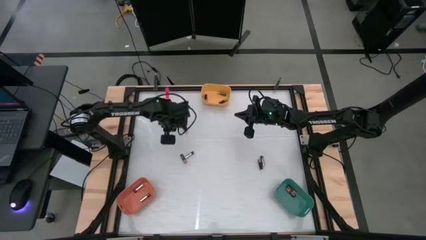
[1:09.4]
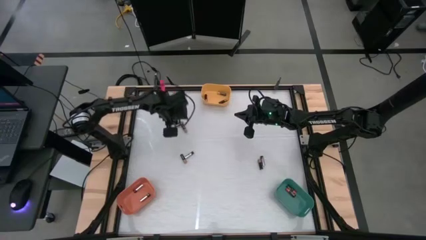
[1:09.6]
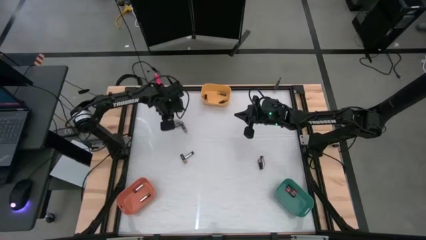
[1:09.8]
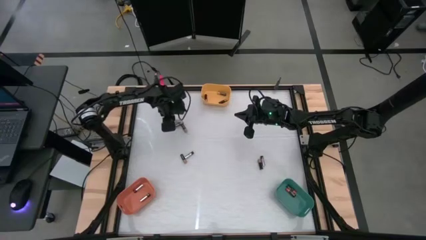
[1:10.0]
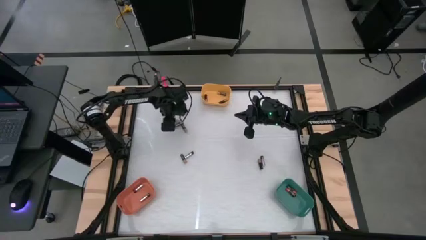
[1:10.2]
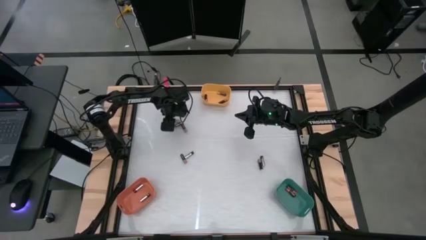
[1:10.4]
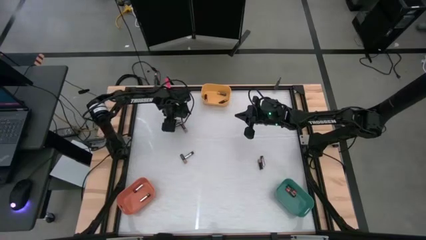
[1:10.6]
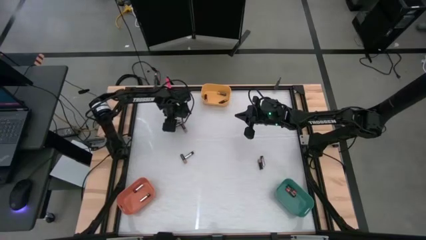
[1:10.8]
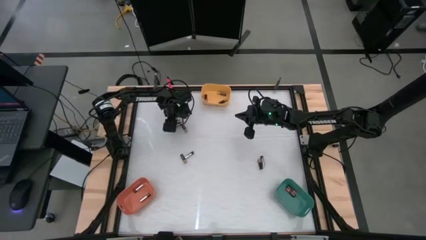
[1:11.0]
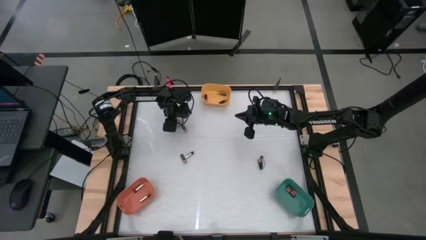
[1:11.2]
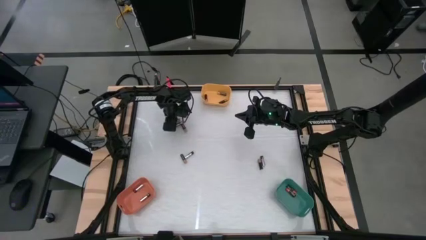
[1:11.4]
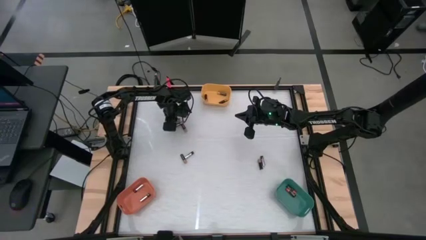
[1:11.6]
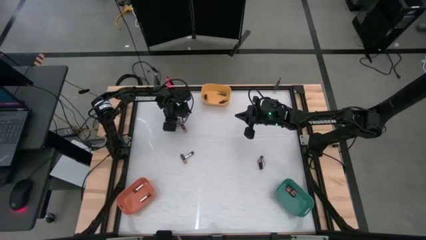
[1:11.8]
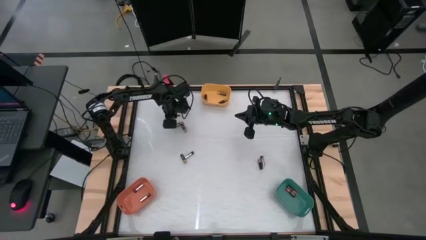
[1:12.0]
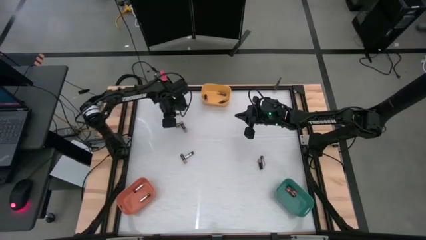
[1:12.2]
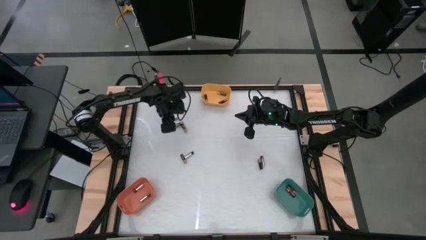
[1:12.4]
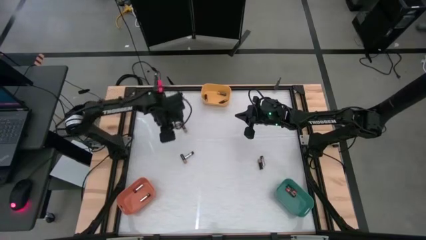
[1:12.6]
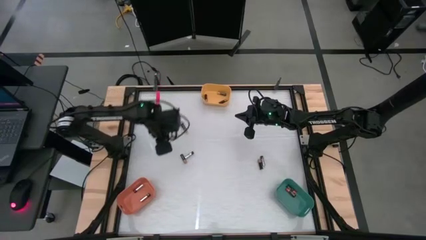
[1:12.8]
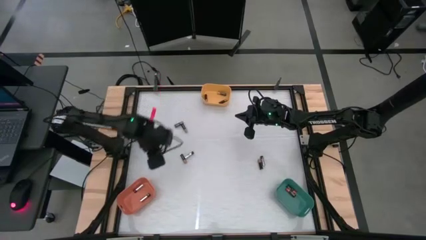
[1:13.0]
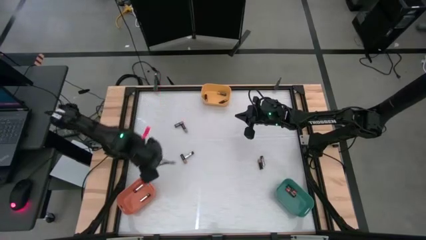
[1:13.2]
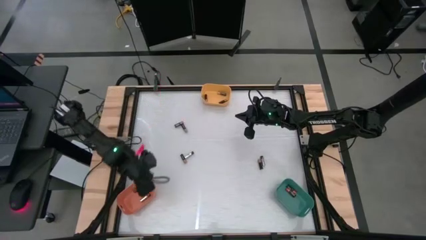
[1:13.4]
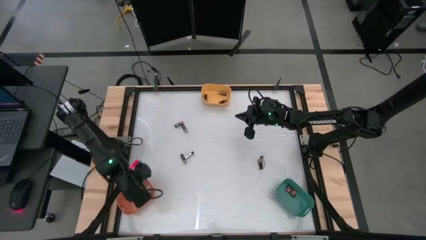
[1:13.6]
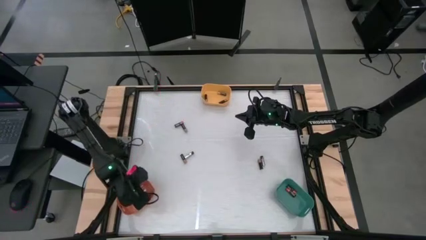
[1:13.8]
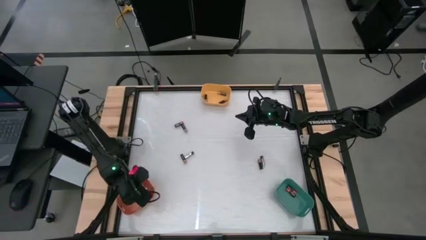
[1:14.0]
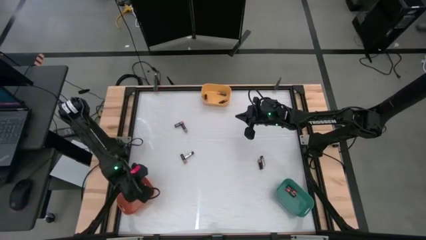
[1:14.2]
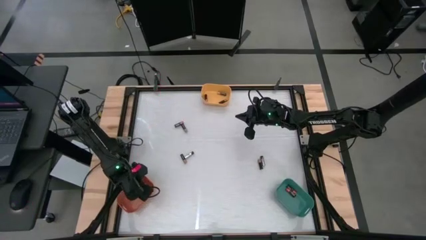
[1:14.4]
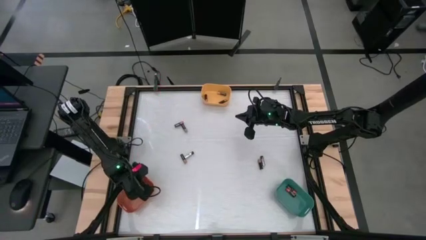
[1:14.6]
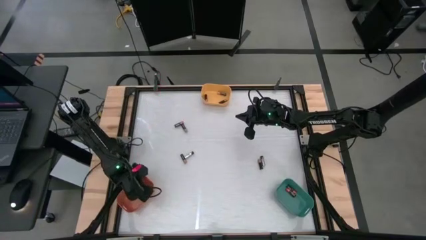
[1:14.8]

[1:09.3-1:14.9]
Task: Sort batteries
Put the silver battery into the orange bin

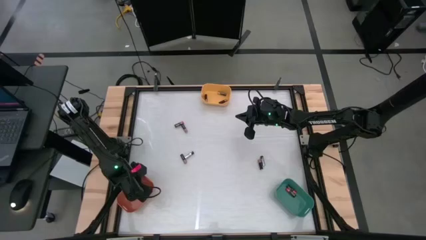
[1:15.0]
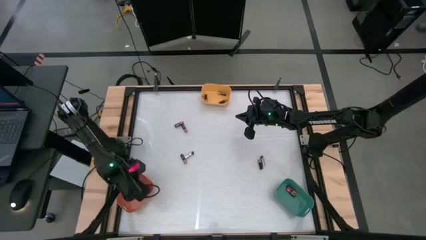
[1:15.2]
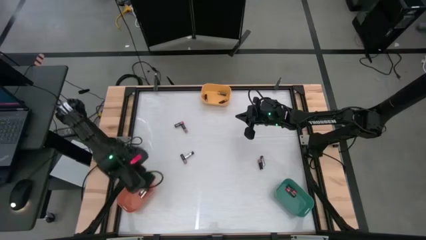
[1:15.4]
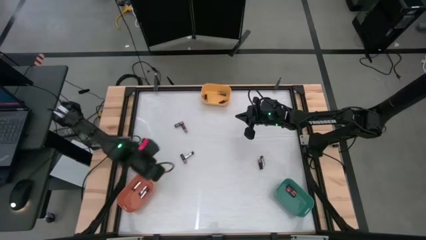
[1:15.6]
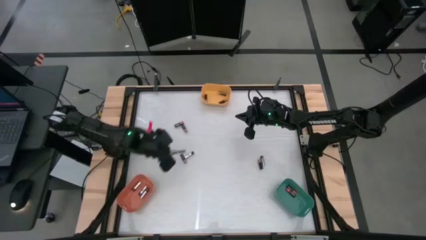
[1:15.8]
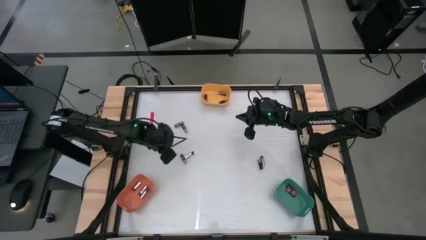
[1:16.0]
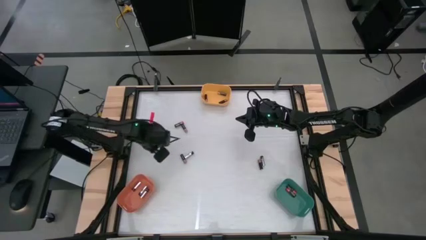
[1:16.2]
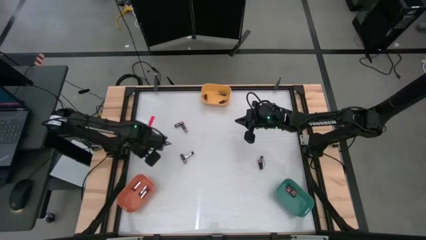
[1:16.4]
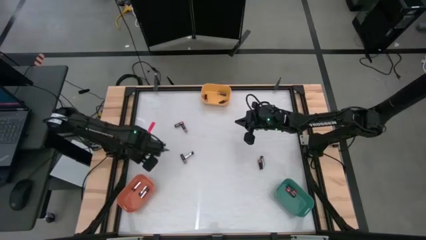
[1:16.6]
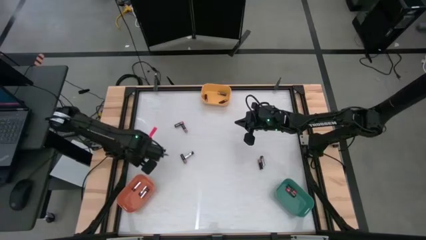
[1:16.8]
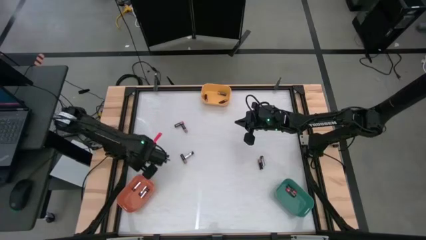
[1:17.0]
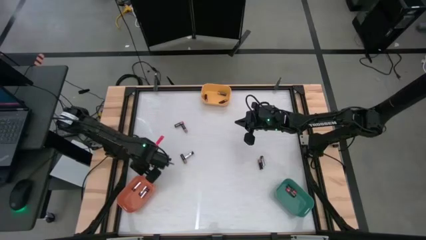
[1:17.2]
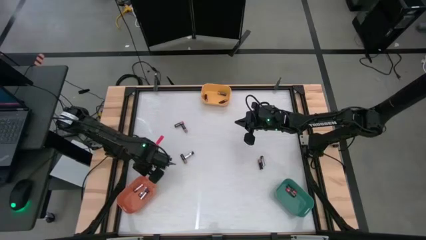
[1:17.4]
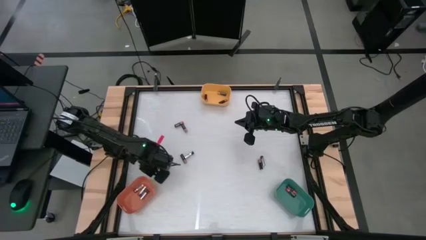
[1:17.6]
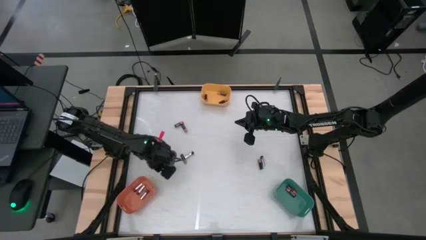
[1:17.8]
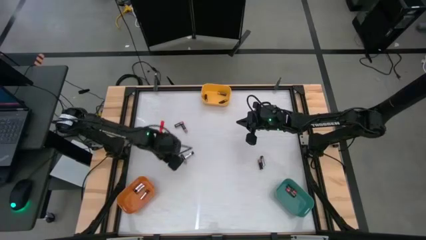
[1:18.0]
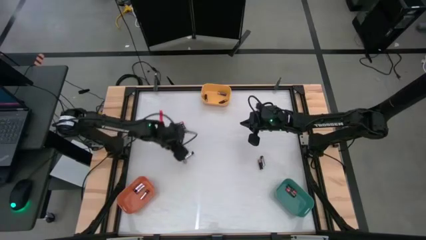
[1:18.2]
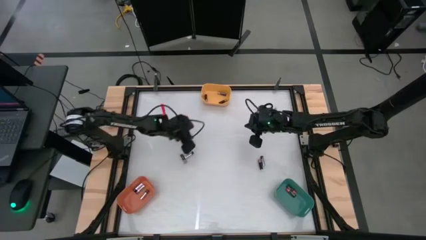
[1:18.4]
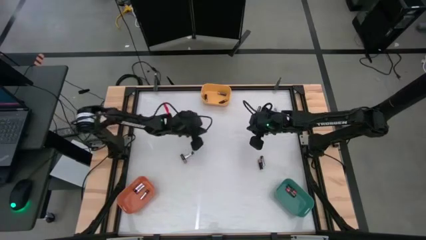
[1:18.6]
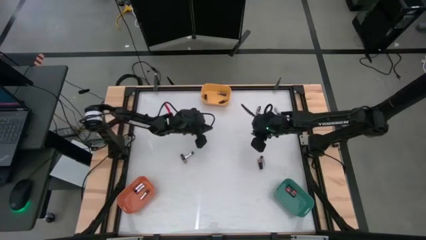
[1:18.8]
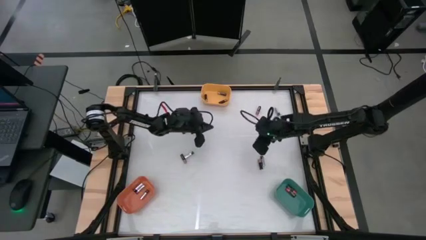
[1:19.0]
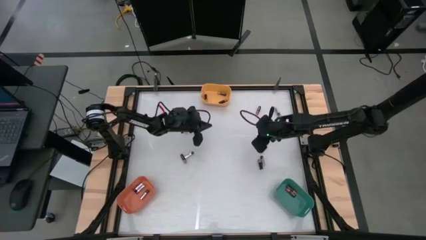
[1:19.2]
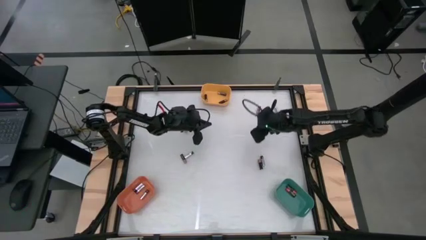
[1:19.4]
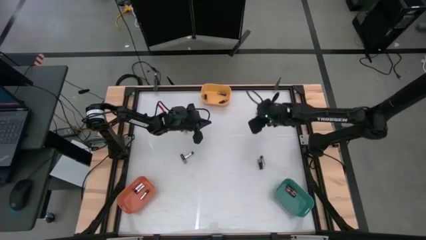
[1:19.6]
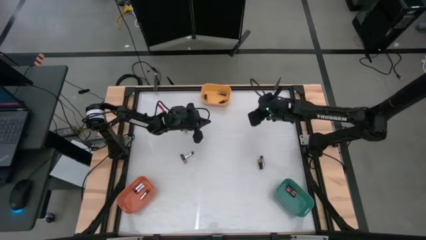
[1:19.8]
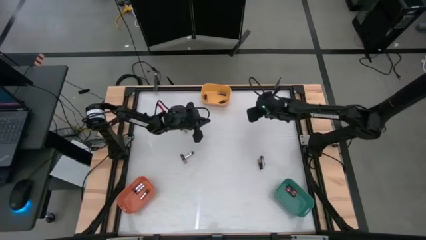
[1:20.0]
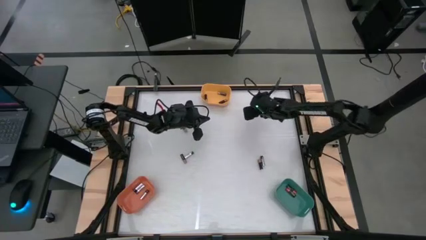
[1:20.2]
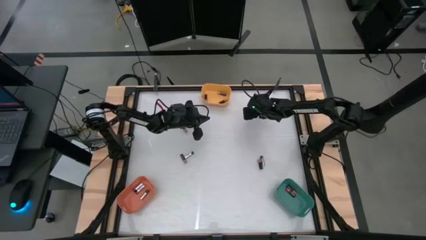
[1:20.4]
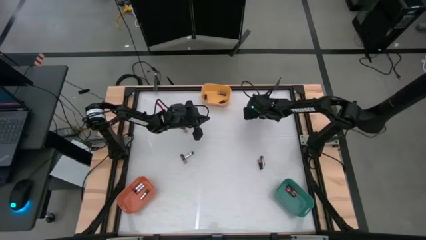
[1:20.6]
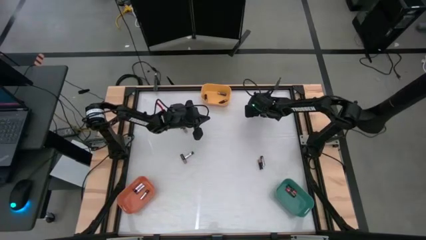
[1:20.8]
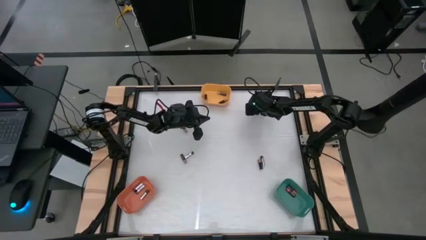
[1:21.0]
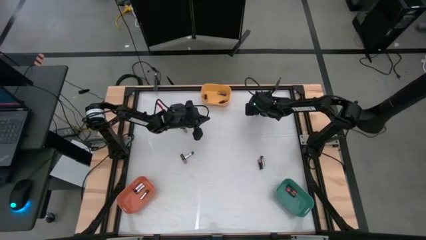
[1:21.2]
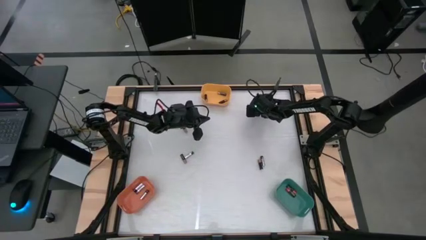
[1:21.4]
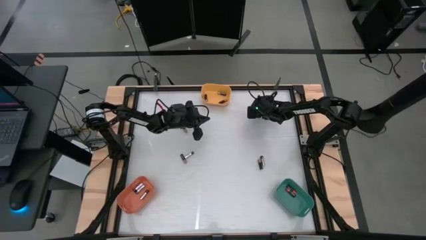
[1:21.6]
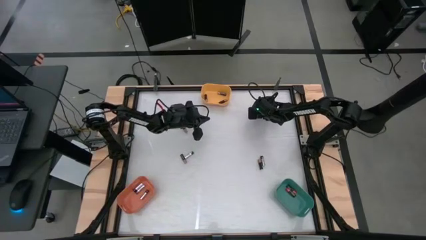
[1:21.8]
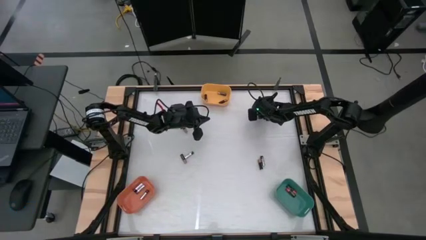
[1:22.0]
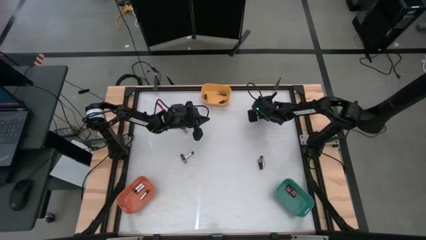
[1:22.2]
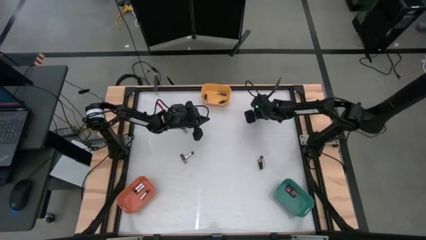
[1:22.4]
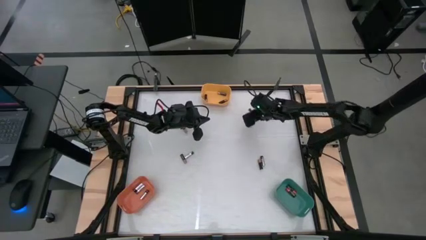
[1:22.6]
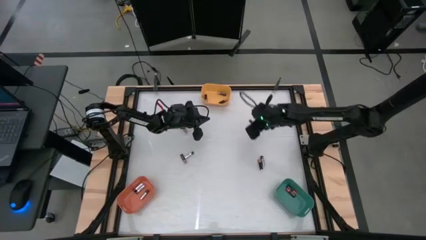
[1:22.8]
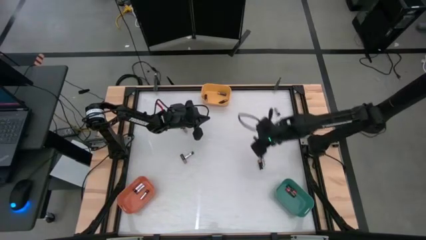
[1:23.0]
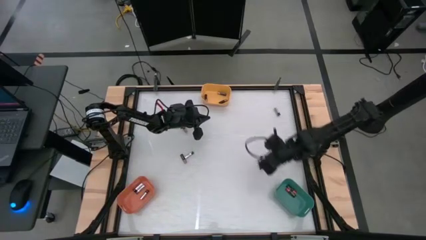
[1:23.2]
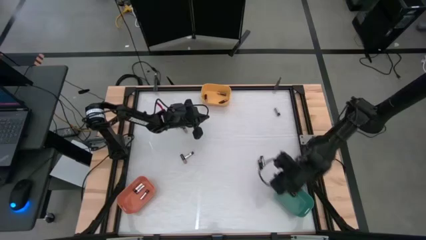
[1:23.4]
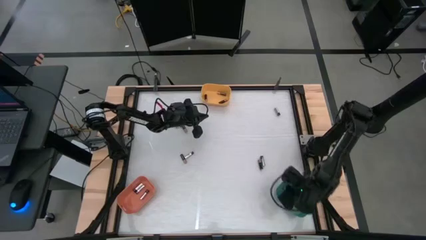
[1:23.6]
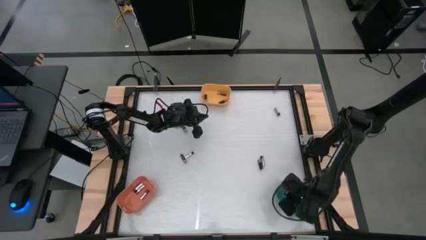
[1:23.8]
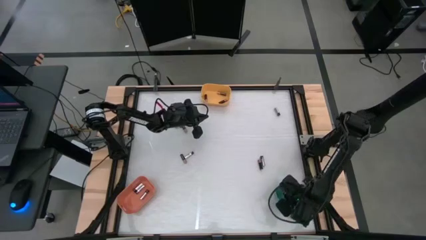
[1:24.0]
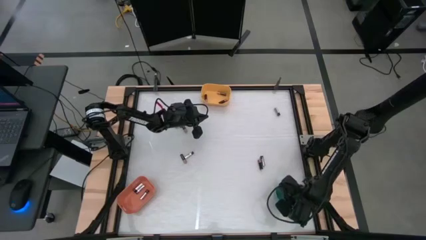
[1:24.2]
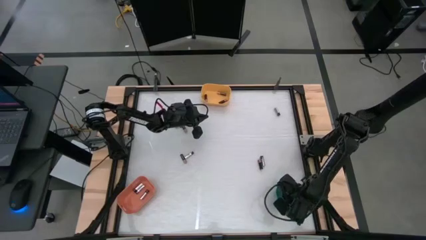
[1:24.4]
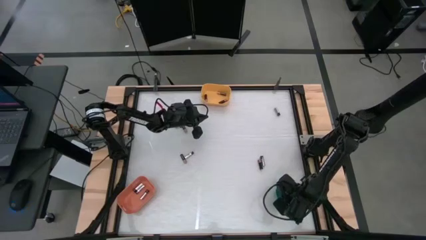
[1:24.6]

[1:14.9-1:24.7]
Put the black-red battery into the green bin
